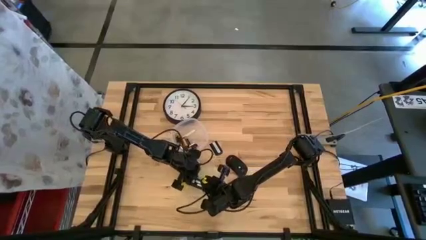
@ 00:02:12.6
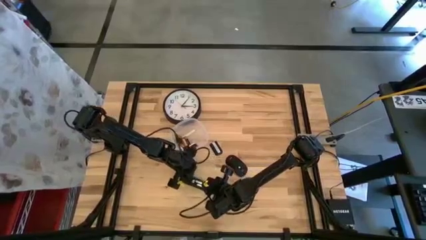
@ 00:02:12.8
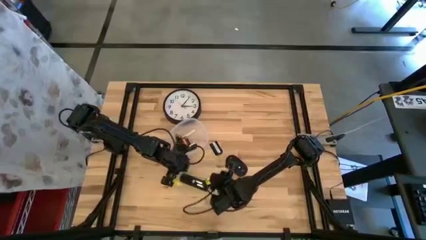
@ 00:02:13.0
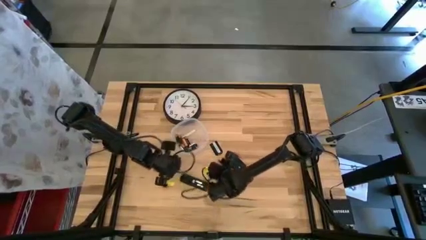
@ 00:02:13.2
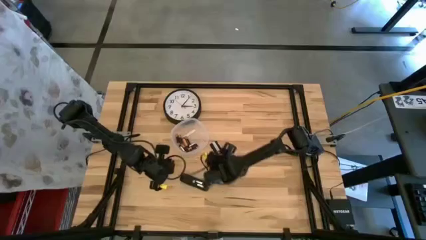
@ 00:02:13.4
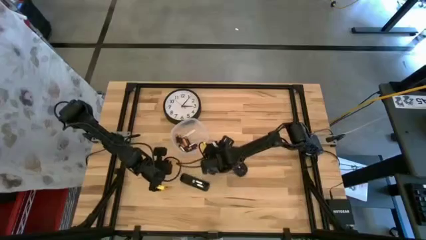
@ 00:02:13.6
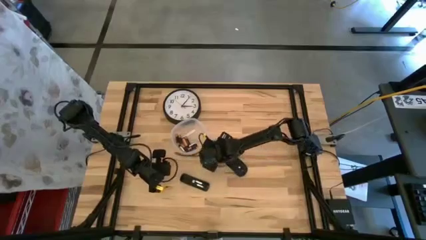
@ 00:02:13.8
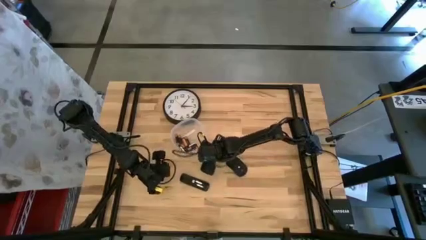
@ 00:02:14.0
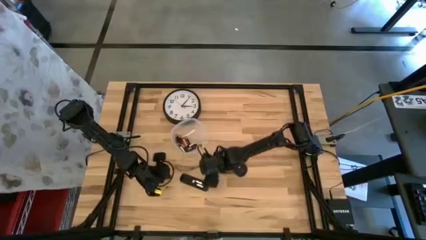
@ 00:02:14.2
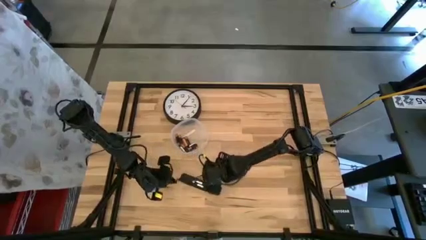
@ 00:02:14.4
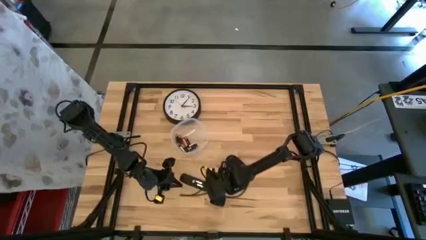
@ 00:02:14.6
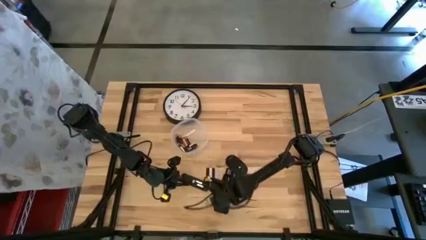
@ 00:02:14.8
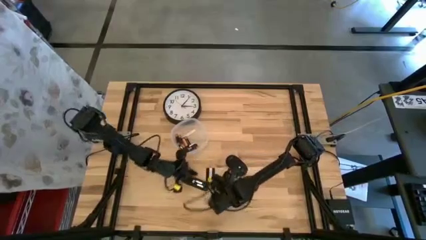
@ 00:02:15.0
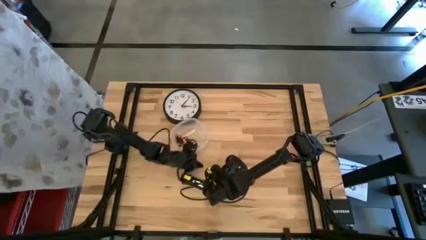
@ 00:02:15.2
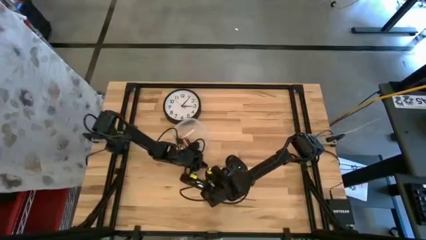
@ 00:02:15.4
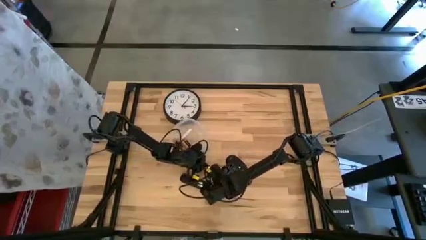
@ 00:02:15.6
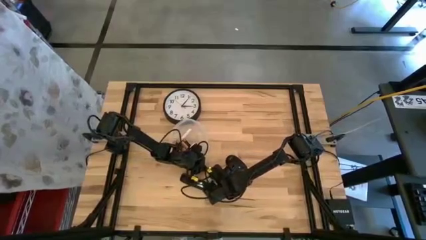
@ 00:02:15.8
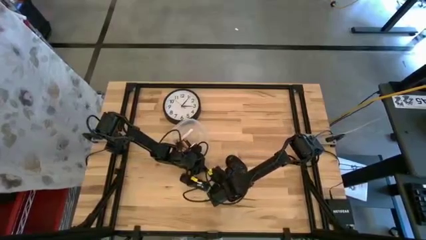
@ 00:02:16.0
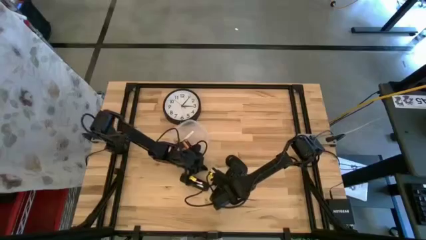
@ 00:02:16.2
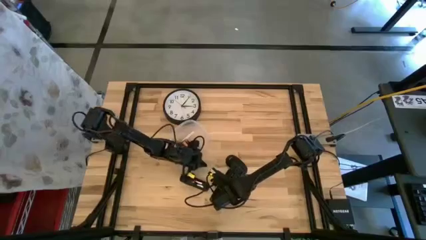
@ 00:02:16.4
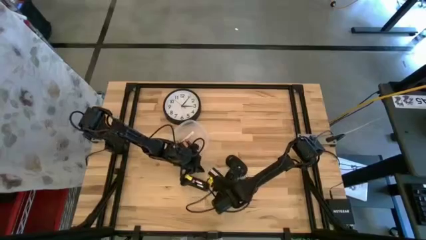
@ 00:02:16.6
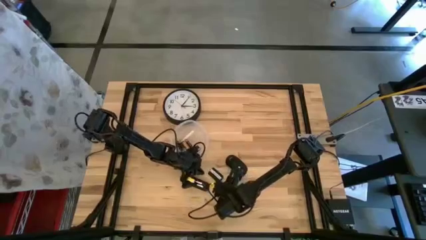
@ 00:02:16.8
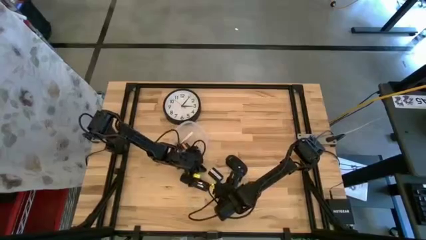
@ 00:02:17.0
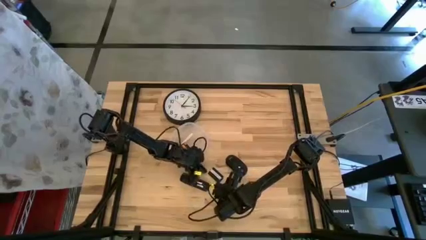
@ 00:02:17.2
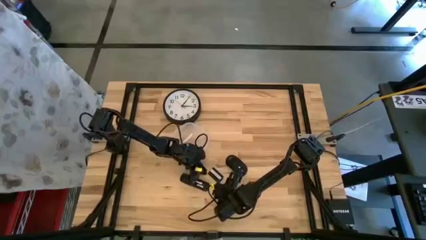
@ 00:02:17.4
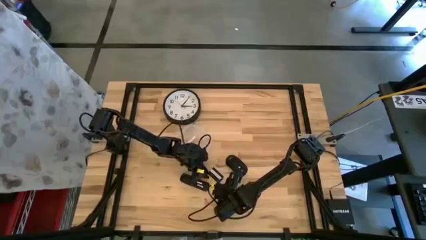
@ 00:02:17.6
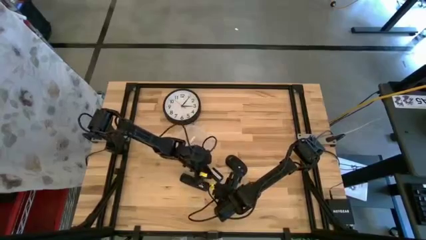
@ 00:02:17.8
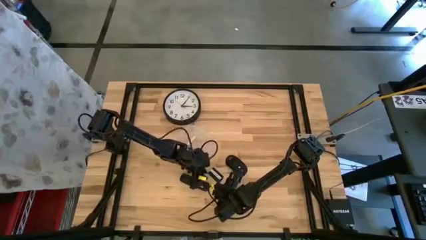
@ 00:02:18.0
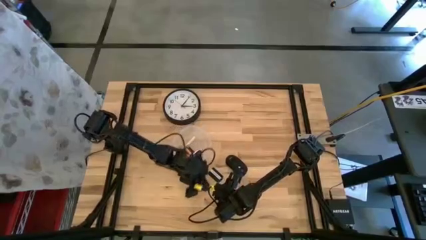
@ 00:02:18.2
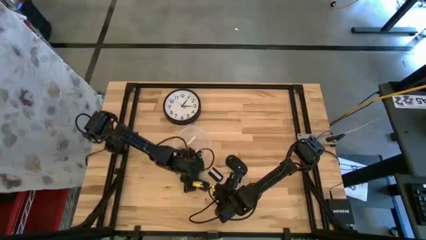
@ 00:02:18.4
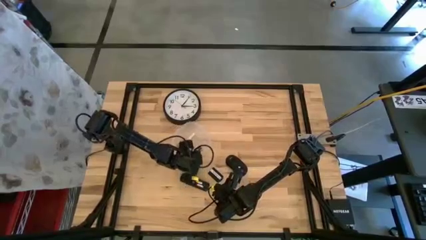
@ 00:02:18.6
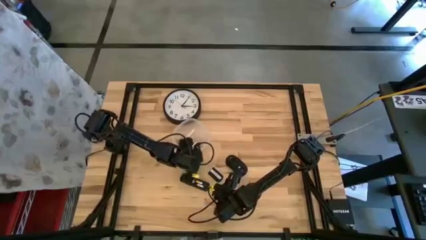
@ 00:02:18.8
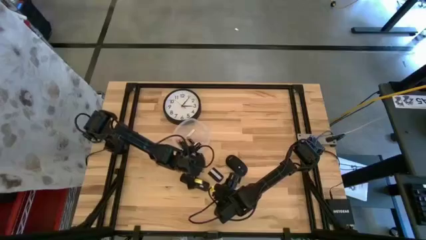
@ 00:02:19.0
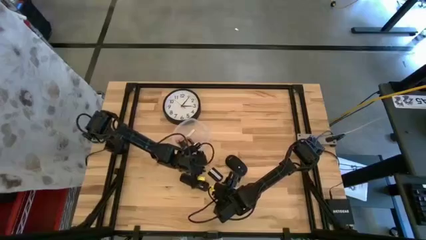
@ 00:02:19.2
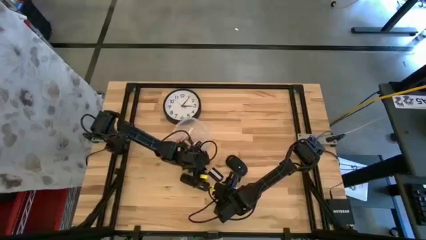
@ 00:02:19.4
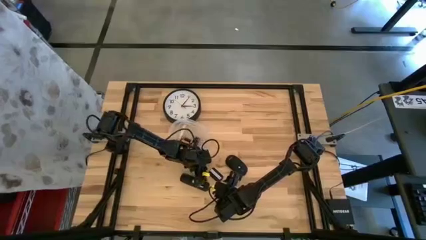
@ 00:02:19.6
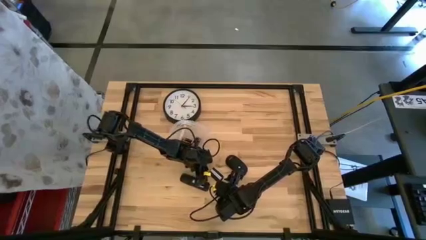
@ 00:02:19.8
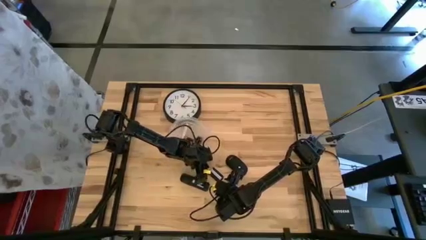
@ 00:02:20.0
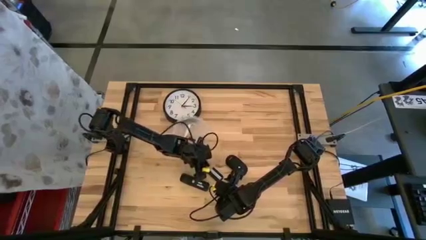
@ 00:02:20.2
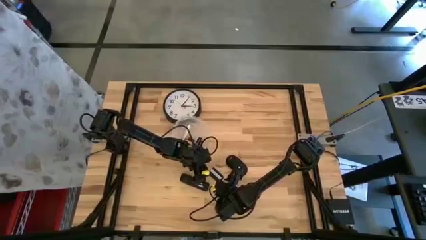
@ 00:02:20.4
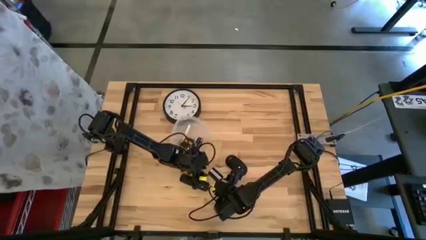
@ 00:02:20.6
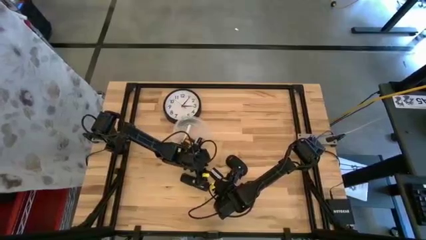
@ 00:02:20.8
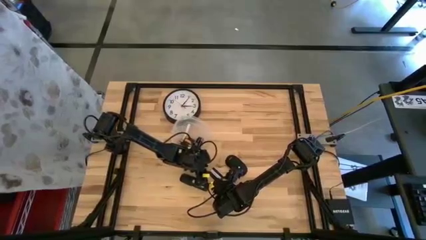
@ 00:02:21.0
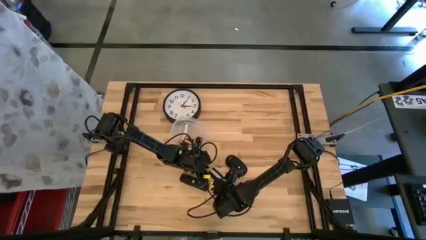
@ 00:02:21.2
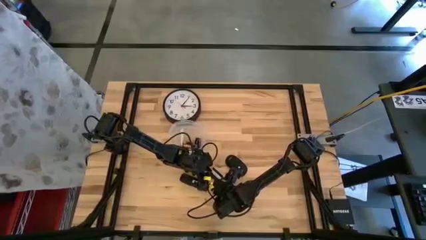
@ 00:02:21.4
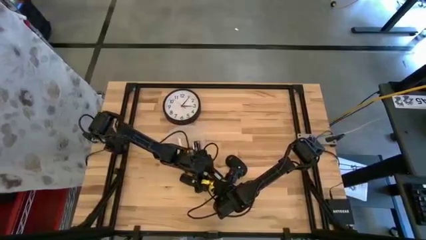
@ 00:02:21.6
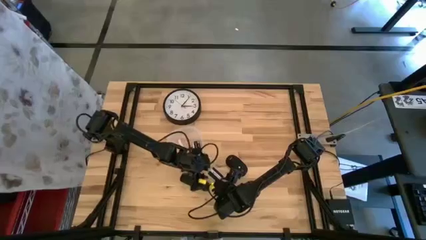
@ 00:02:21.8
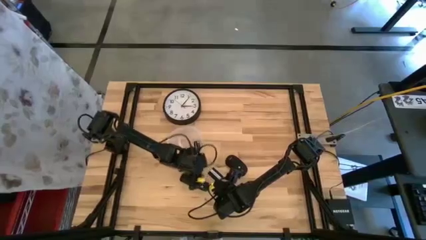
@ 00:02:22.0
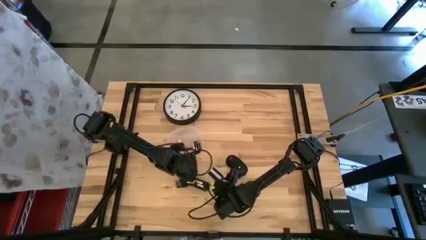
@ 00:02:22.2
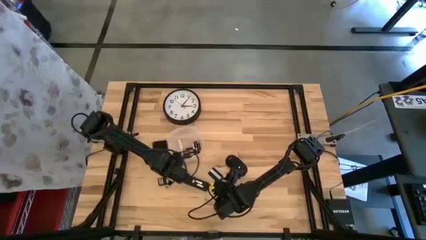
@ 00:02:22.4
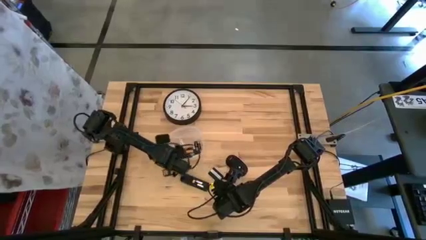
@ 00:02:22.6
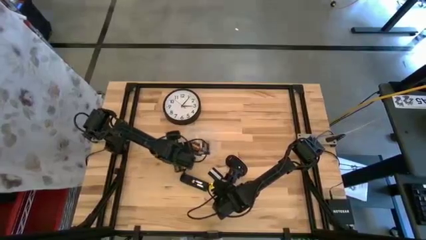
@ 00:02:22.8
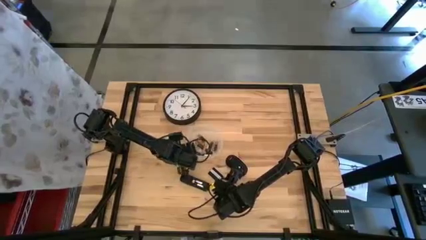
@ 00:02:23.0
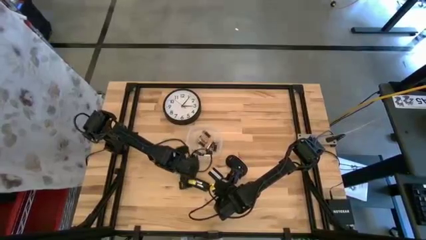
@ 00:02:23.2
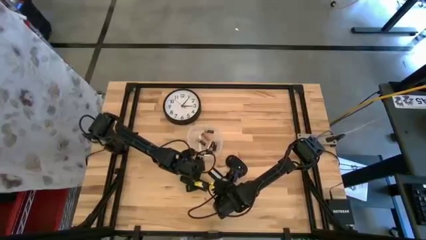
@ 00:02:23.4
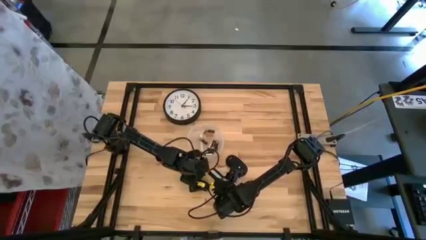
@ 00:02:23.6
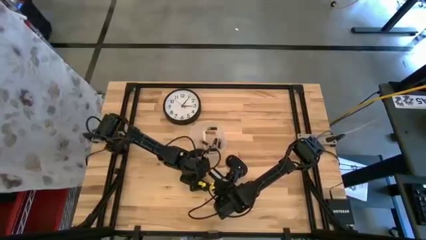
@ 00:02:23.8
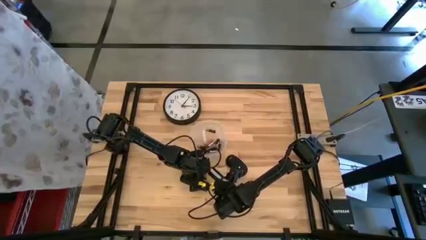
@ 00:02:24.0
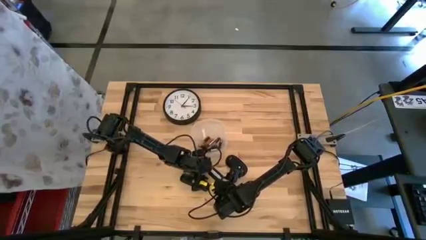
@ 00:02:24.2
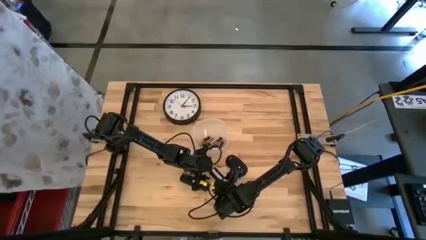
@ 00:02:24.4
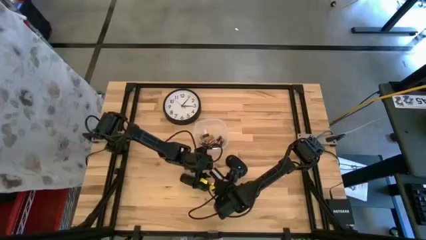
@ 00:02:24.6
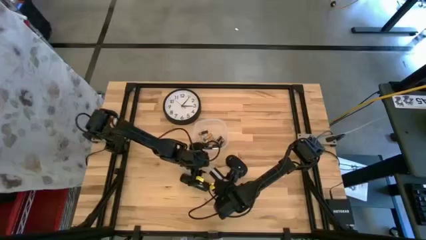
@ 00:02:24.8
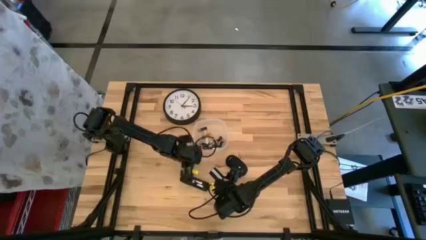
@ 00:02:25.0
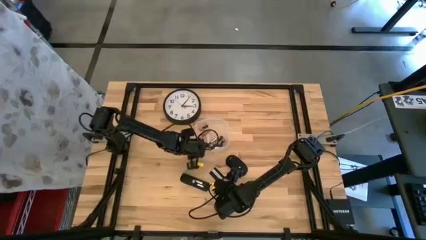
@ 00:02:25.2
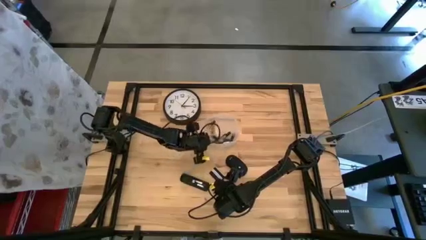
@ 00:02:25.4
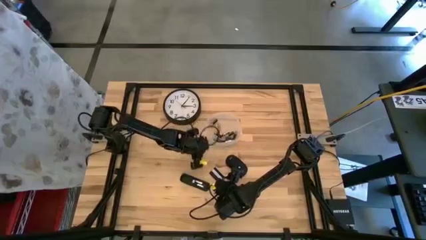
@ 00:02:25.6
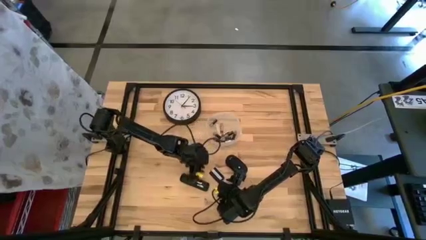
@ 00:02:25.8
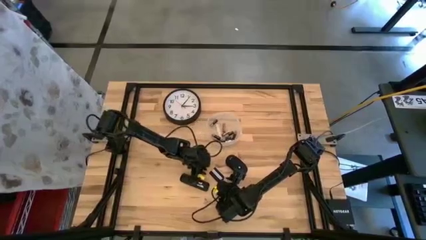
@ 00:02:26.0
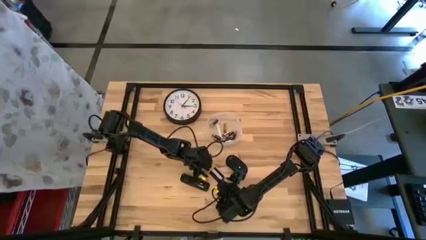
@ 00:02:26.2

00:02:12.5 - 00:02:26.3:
Task: Insert battery
Close the remote control battery cover
